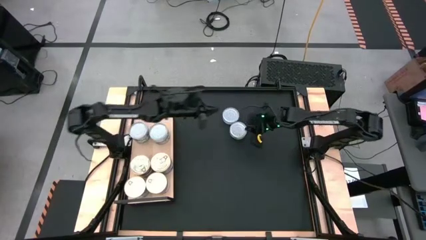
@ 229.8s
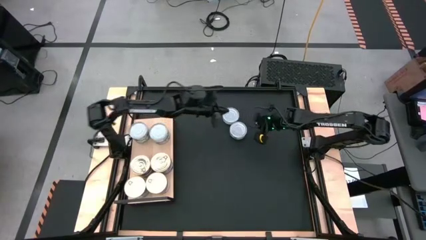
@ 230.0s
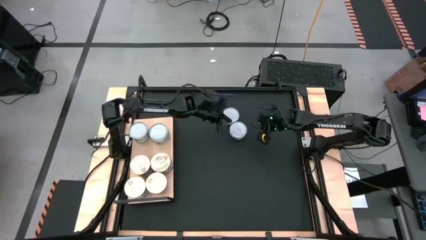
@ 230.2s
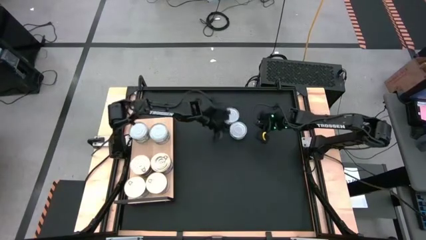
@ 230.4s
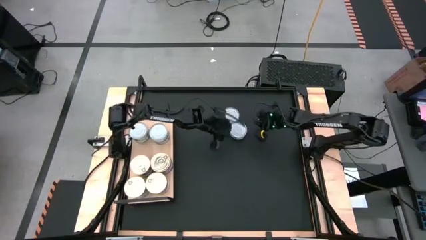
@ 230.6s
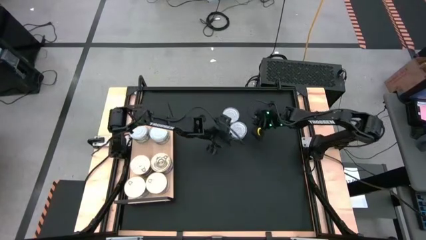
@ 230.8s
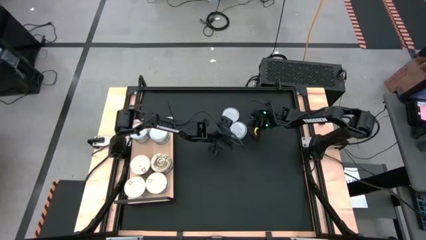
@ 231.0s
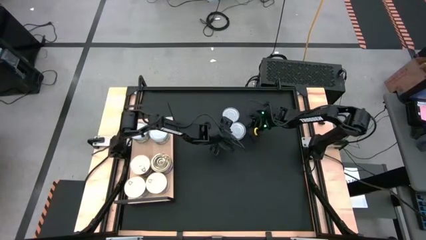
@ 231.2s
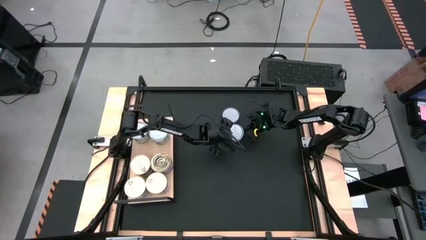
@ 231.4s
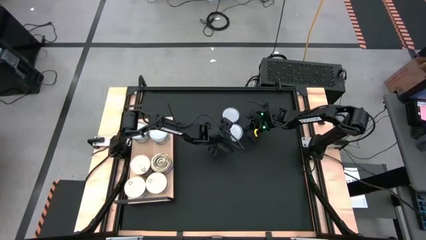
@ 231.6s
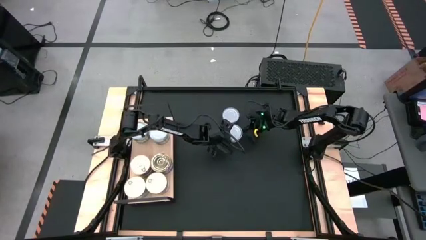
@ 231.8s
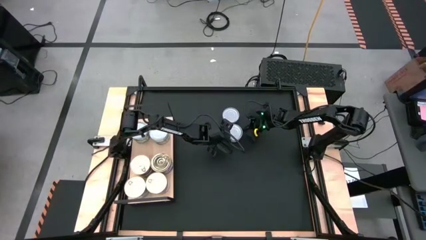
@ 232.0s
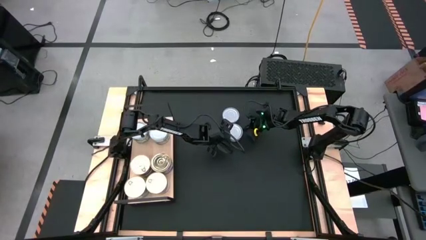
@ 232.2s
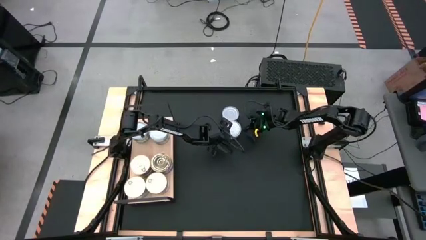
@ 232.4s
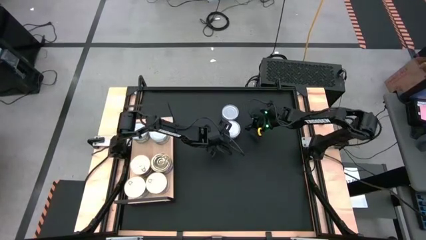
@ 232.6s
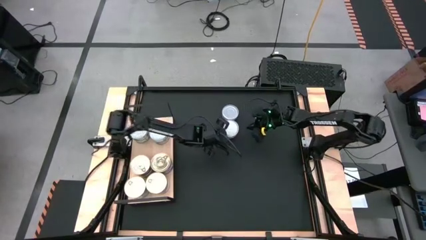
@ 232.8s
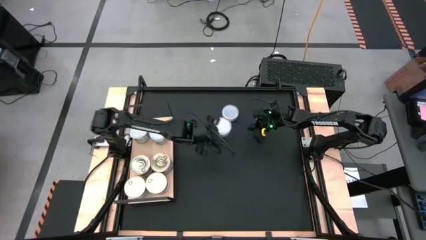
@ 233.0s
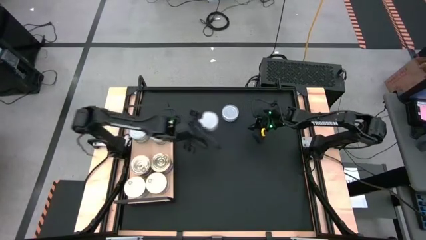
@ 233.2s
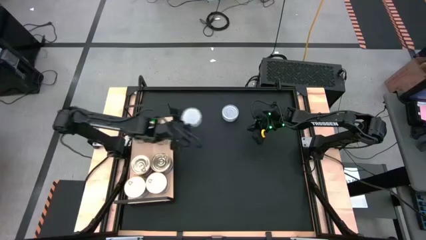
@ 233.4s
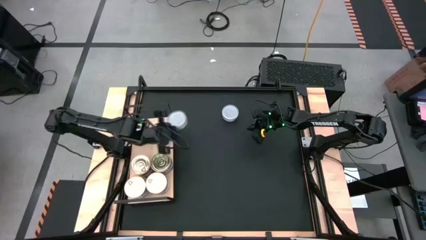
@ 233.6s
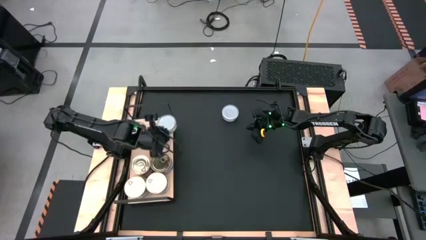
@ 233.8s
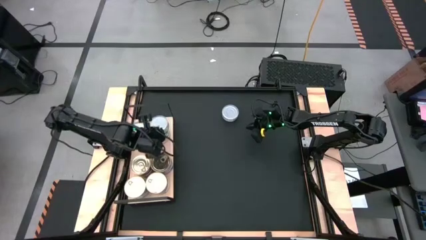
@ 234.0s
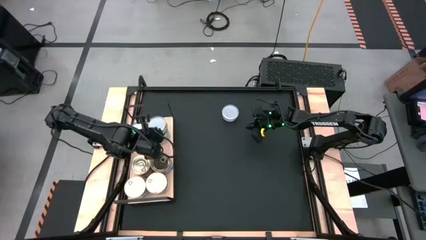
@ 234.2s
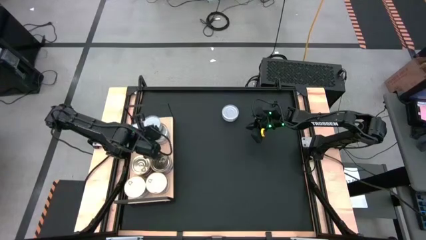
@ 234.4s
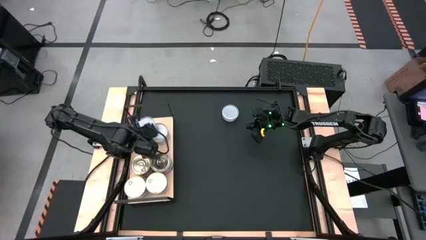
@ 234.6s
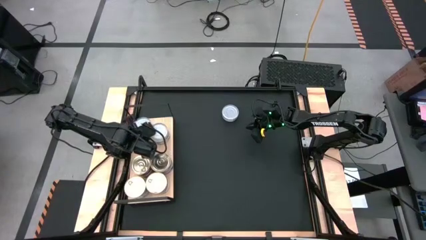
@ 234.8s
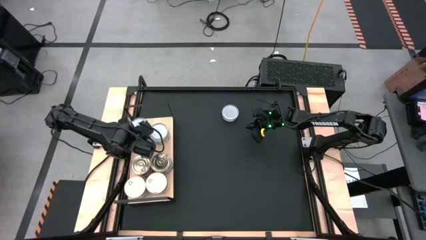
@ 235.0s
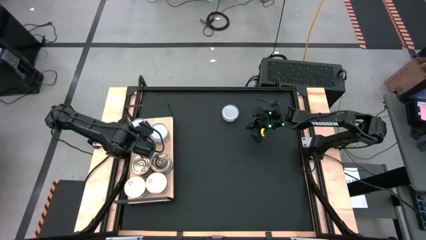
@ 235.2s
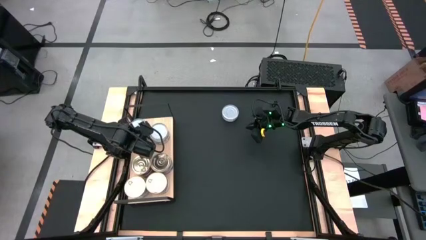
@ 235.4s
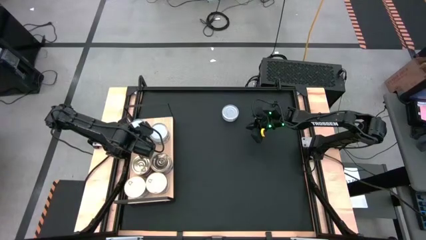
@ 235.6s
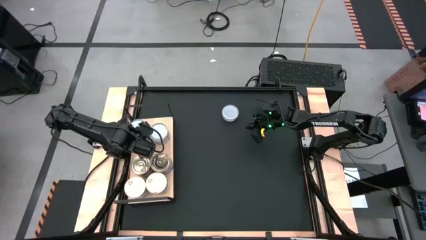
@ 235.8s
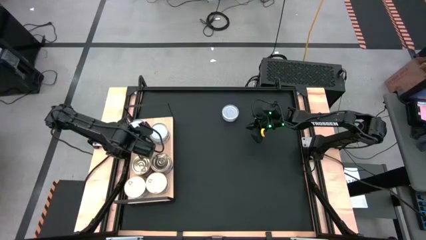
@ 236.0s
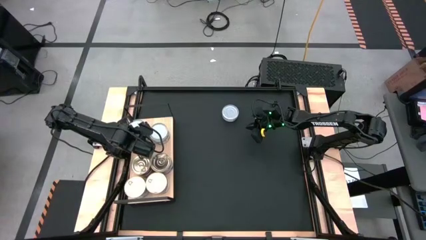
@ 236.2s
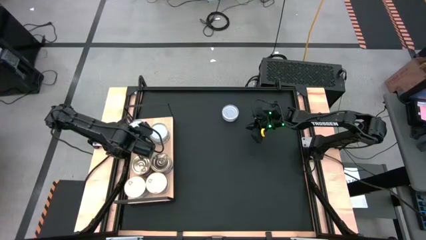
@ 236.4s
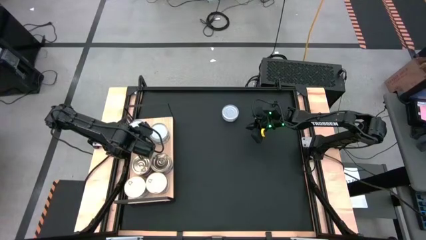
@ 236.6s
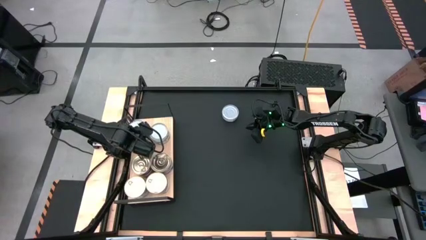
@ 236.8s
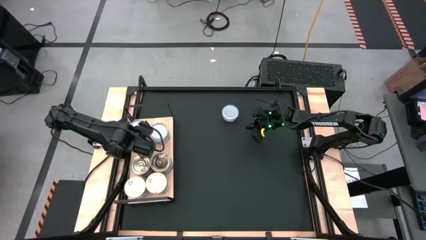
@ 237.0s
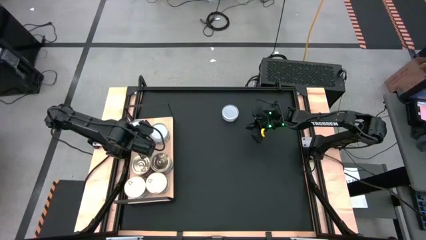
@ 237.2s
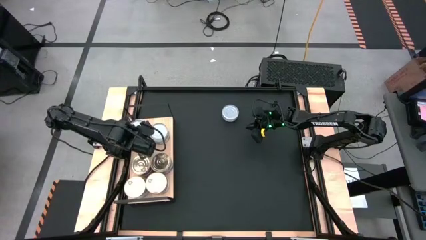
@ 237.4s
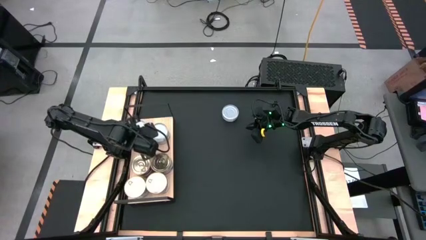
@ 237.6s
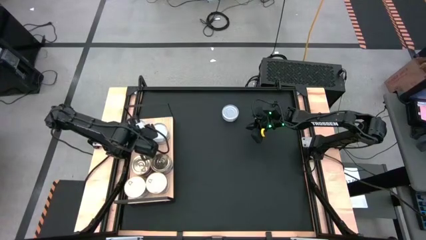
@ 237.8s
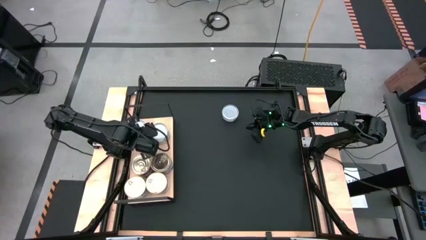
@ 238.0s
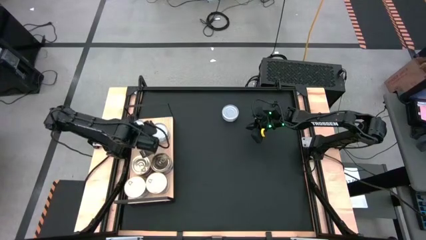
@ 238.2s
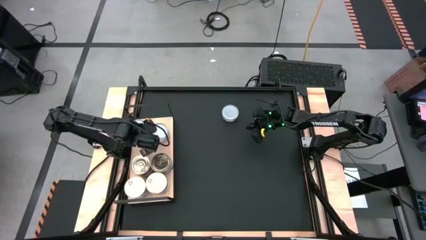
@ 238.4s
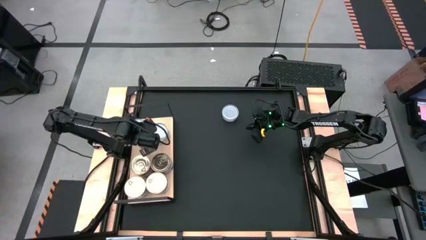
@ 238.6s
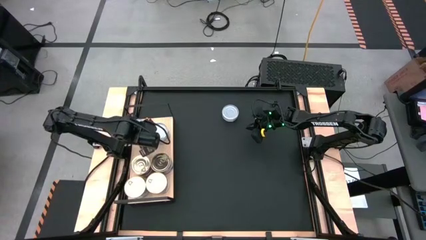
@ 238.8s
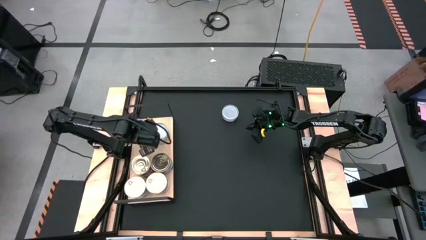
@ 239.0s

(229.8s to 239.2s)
Task: Stack canned seafood by type on shelf
Stack the green tuna can on top of the green tuna cans on the shelf

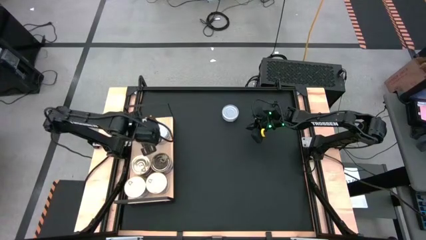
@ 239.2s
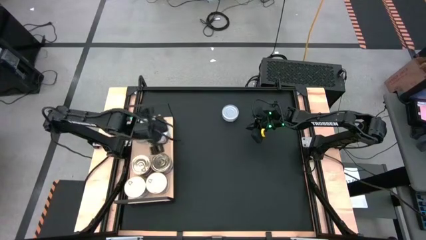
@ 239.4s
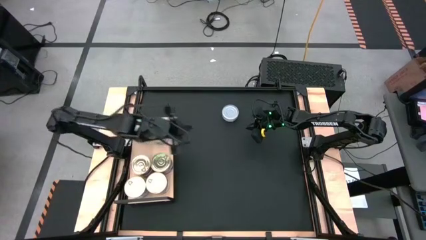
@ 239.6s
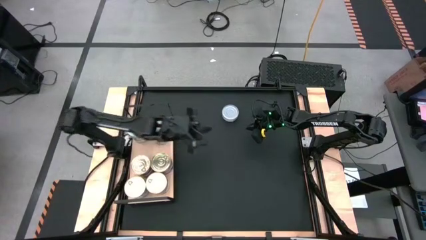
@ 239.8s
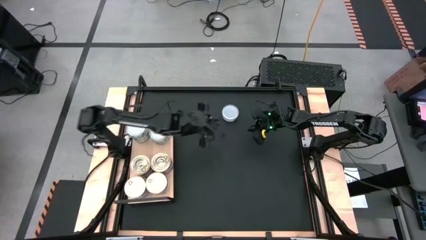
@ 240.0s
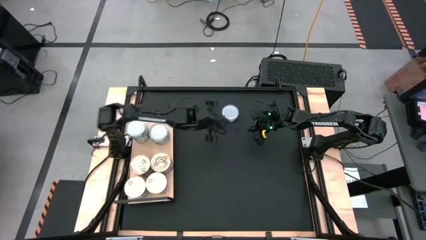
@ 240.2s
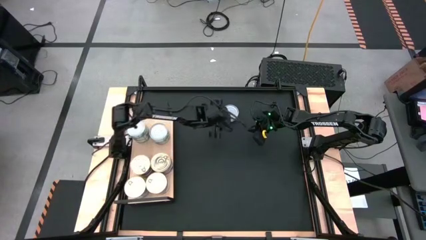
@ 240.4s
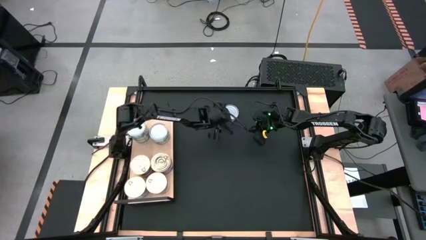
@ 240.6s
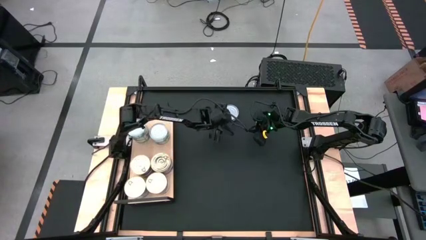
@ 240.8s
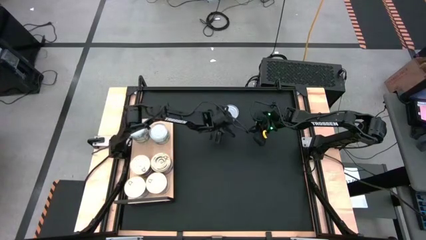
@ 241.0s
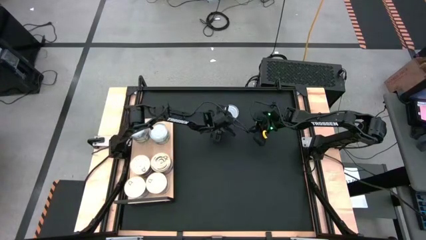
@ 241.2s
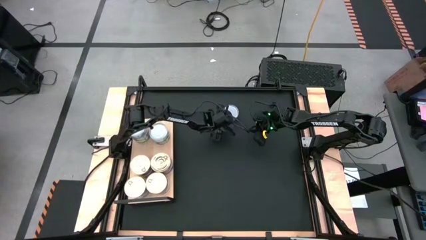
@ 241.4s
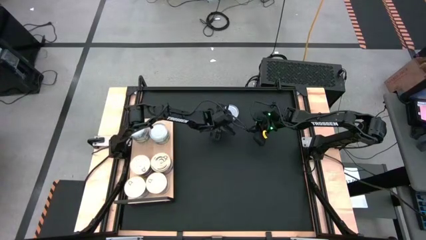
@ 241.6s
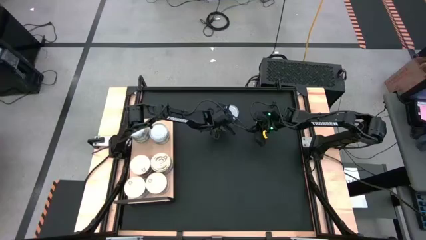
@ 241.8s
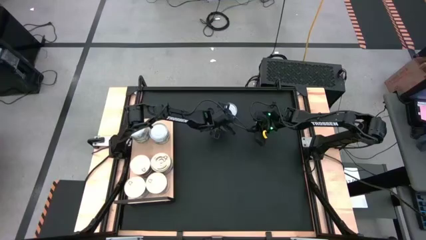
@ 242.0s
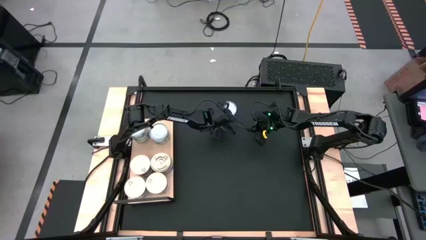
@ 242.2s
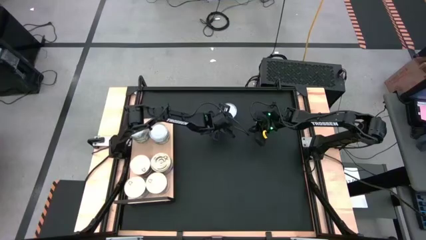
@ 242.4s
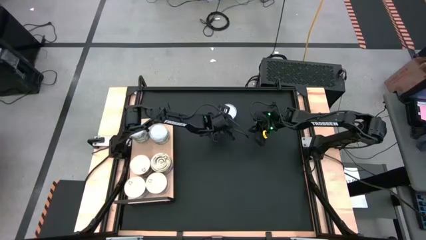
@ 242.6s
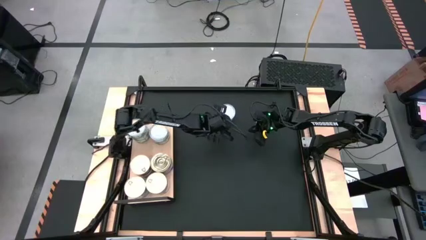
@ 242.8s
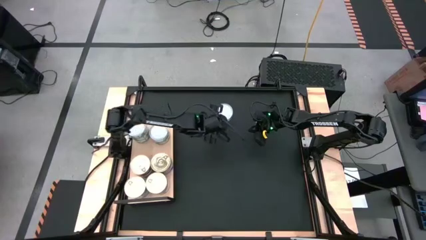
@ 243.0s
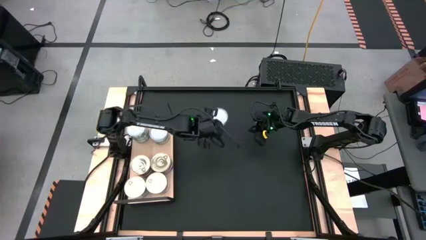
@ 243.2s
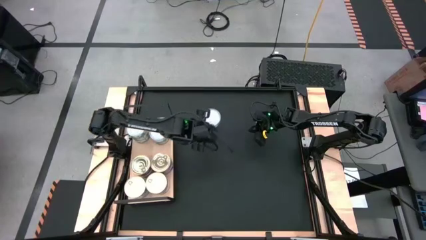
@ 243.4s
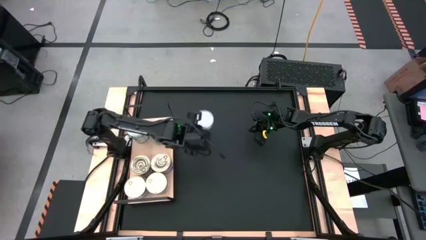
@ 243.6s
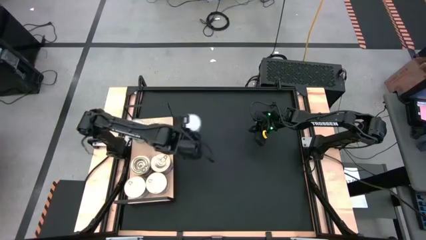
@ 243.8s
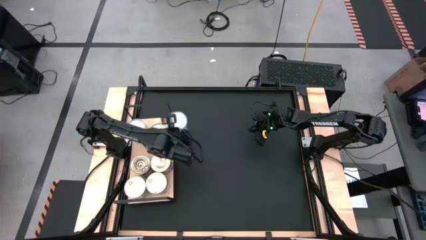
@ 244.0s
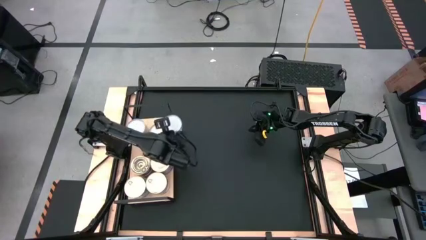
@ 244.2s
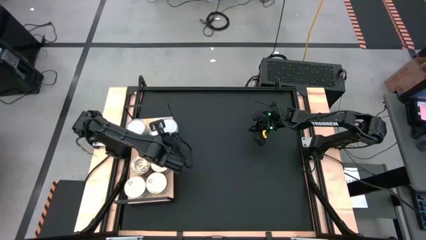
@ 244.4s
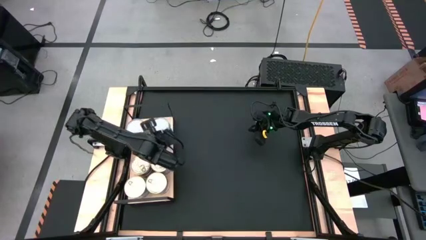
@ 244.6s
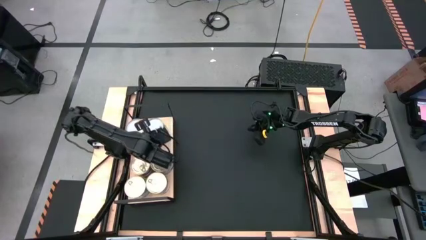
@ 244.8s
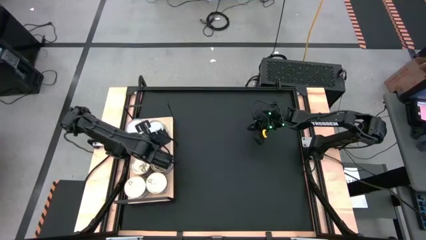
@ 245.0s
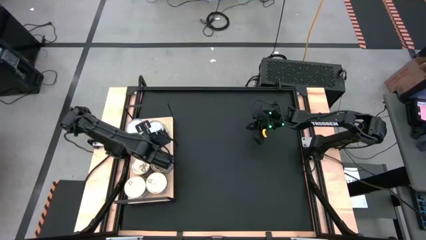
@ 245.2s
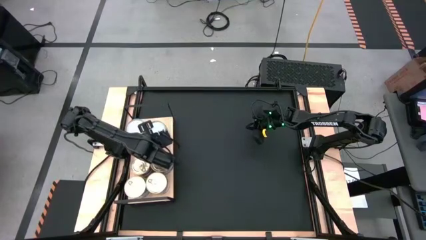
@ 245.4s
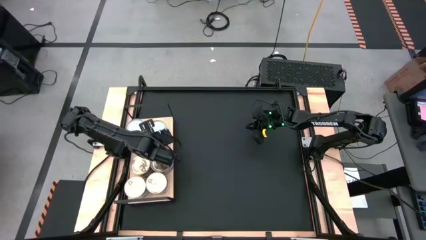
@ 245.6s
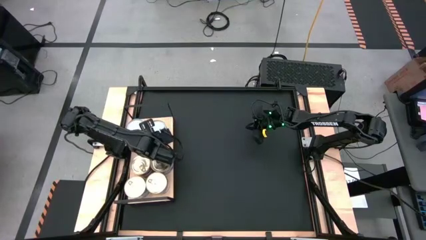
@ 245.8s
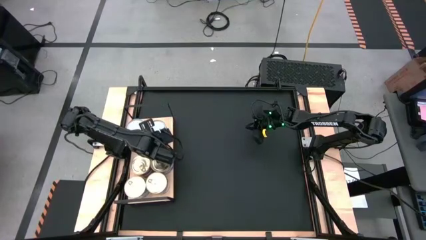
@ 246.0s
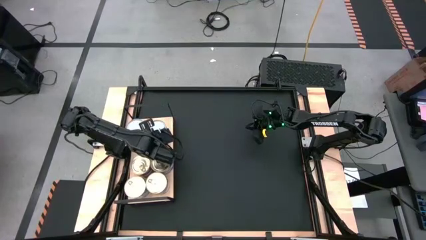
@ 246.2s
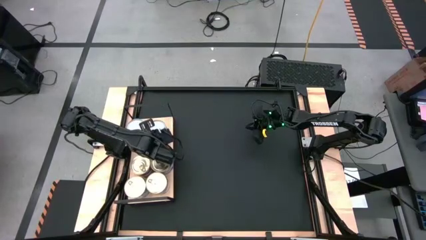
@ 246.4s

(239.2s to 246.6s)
Stack the green tuna can on top of the green cans on the shelf

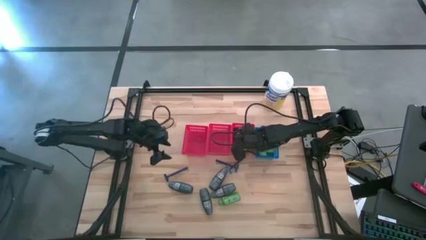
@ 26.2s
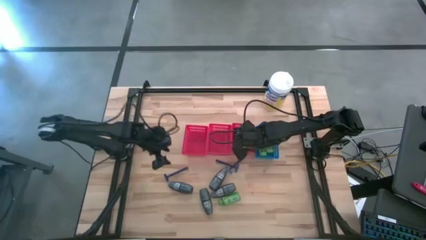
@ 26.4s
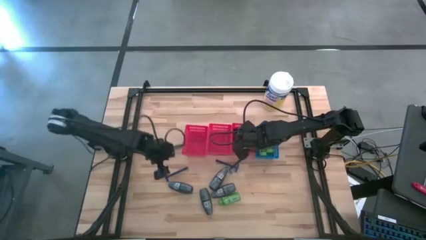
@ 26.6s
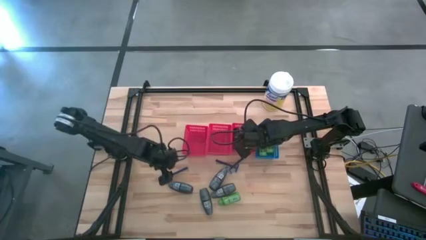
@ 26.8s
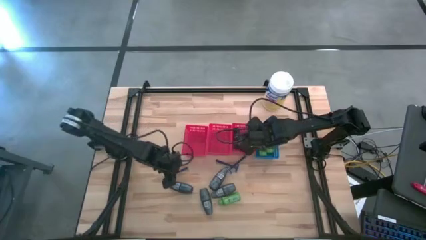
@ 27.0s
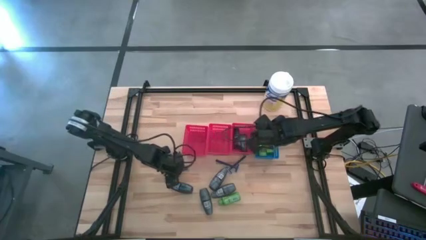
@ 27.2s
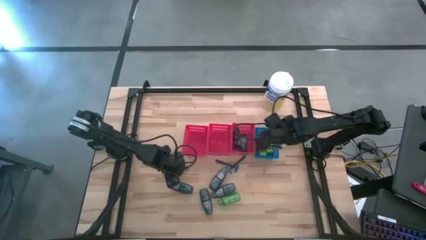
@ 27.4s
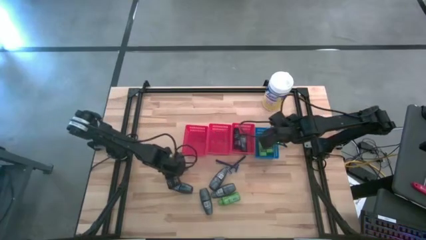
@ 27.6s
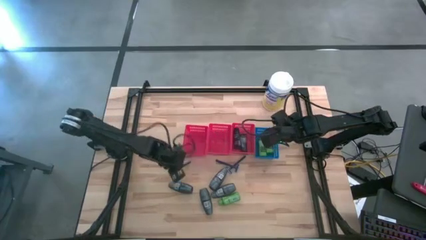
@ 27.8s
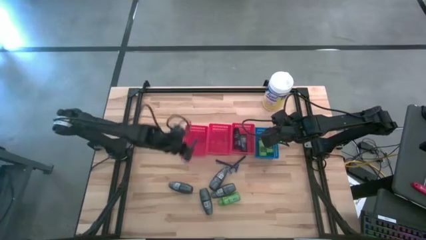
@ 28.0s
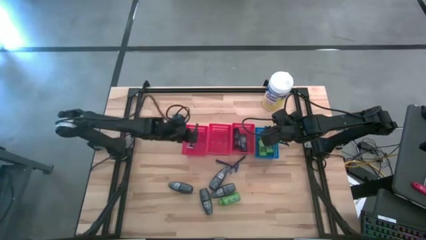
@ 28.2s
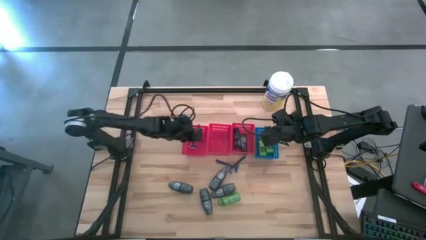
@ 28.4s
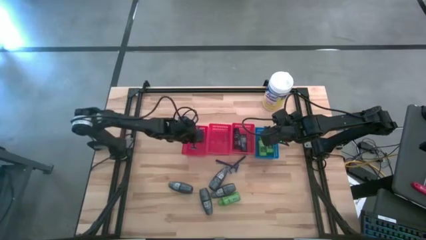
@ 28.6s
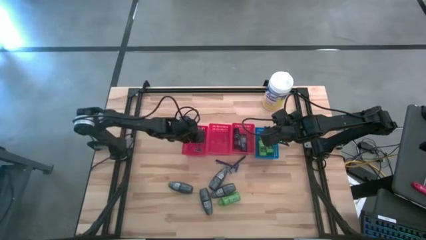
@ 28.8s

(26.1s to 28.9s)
Task: Pick & Place Travel size toiletries
Put the razor into the left red bin
